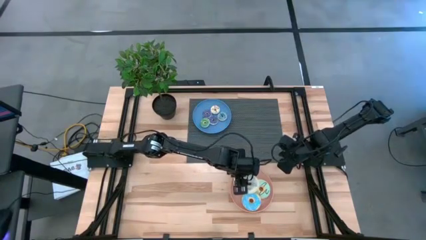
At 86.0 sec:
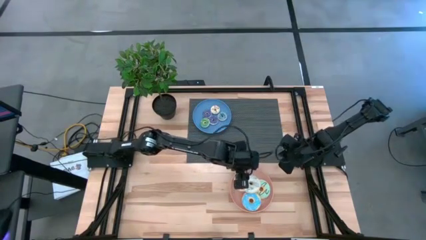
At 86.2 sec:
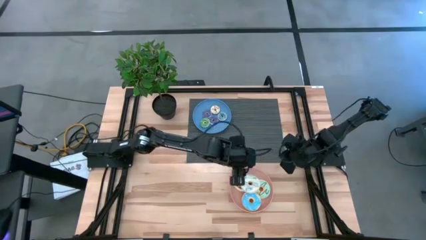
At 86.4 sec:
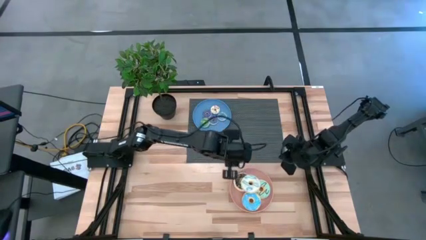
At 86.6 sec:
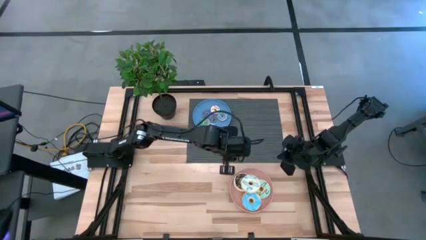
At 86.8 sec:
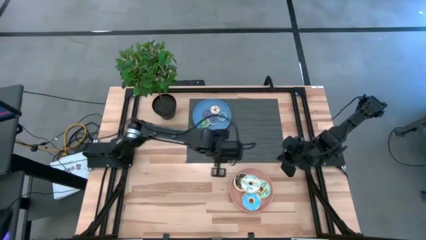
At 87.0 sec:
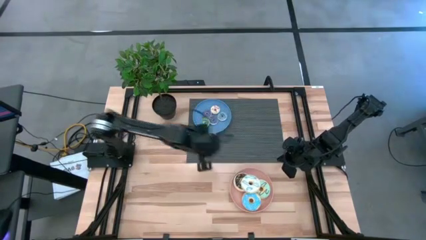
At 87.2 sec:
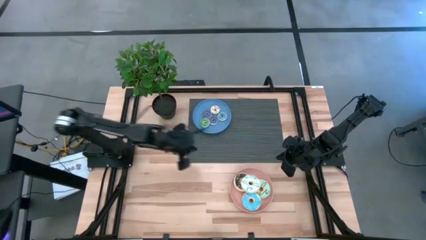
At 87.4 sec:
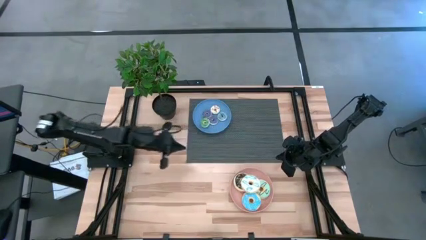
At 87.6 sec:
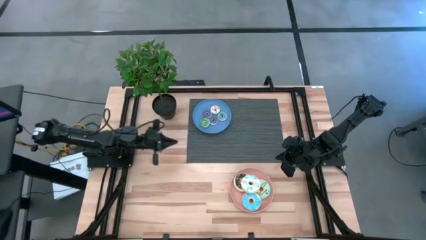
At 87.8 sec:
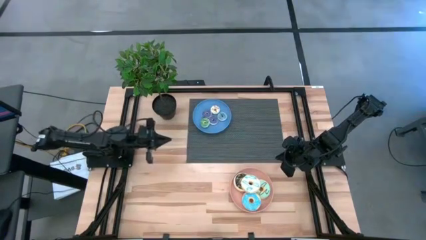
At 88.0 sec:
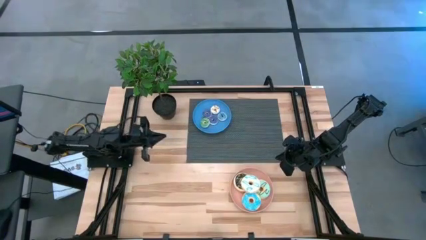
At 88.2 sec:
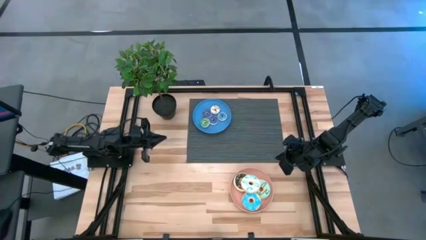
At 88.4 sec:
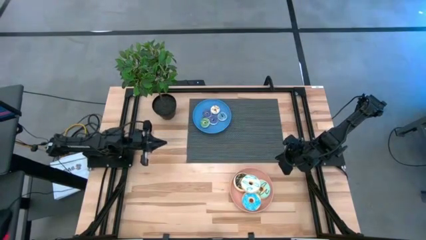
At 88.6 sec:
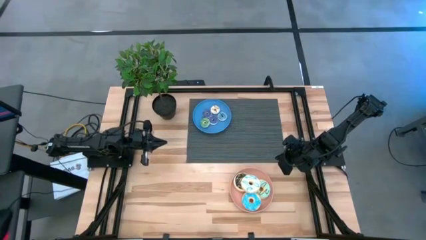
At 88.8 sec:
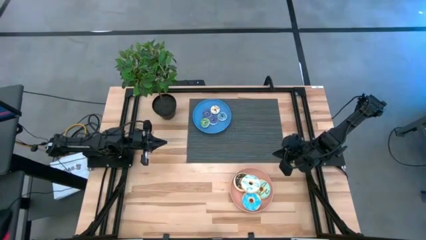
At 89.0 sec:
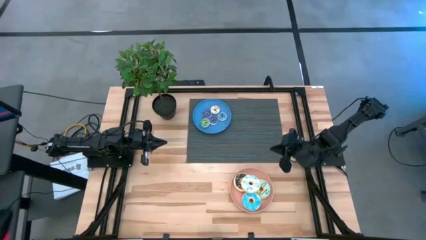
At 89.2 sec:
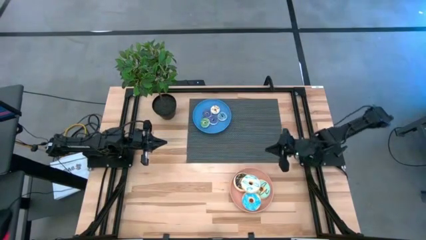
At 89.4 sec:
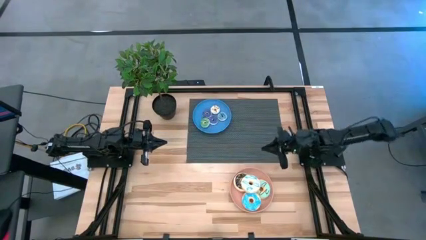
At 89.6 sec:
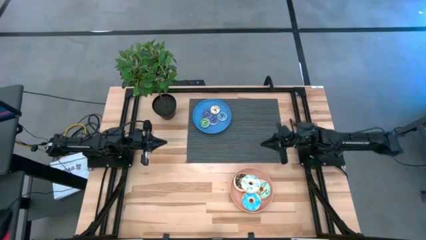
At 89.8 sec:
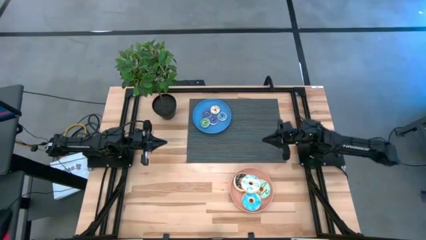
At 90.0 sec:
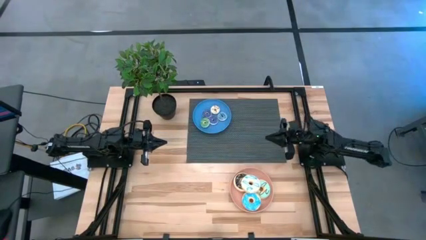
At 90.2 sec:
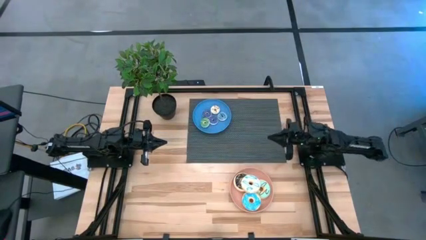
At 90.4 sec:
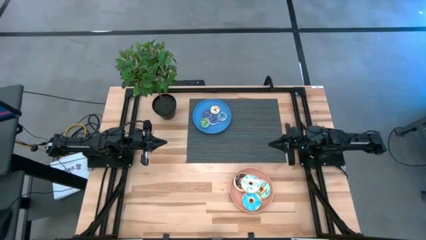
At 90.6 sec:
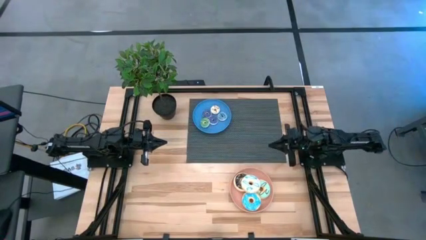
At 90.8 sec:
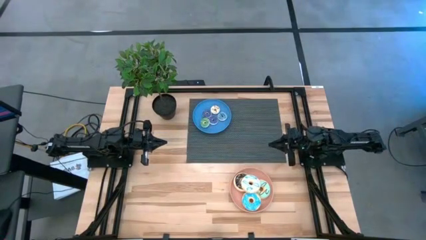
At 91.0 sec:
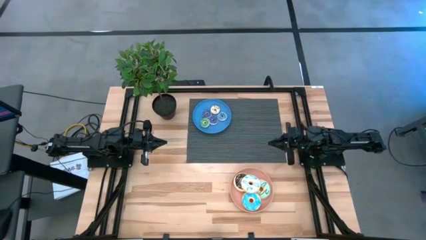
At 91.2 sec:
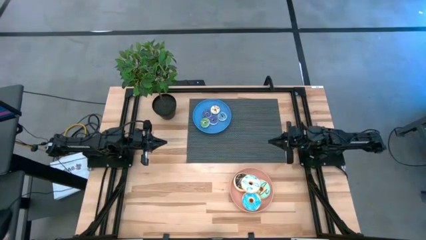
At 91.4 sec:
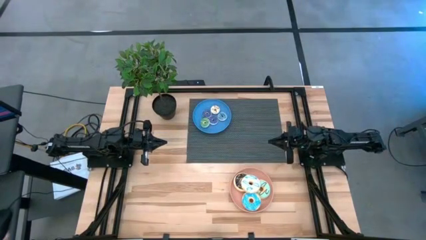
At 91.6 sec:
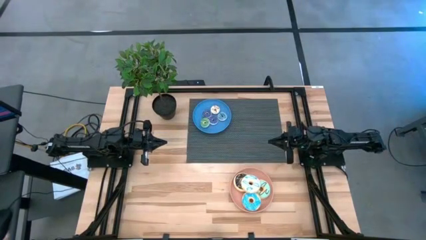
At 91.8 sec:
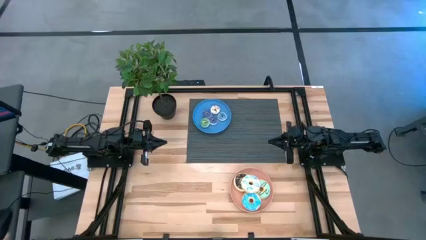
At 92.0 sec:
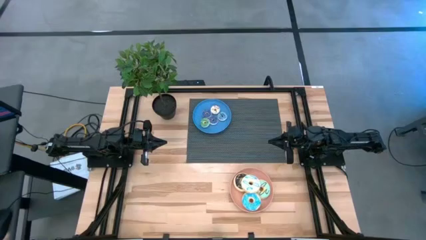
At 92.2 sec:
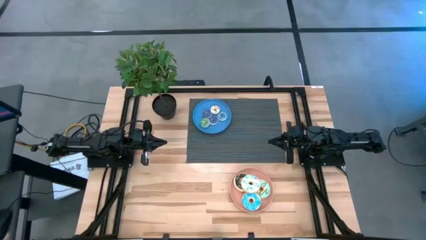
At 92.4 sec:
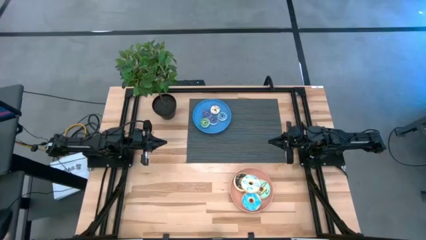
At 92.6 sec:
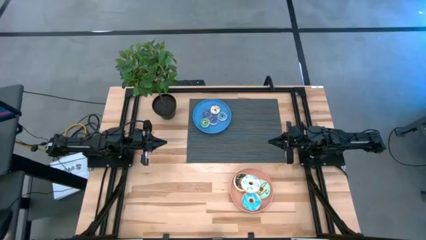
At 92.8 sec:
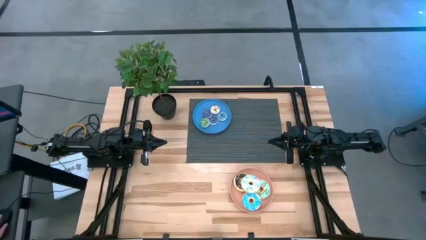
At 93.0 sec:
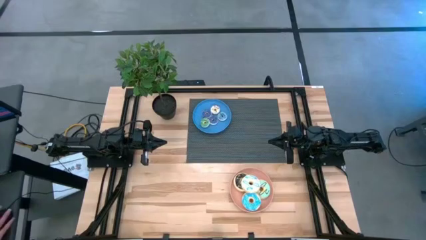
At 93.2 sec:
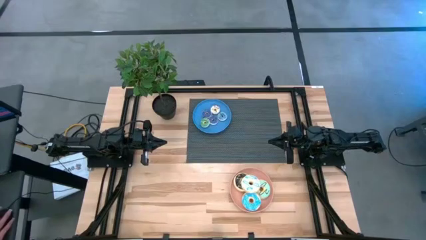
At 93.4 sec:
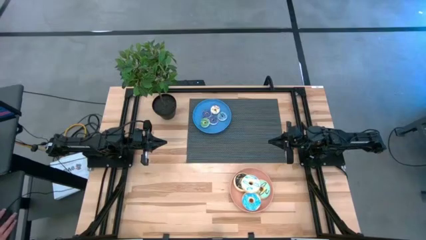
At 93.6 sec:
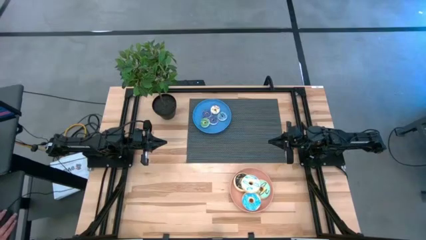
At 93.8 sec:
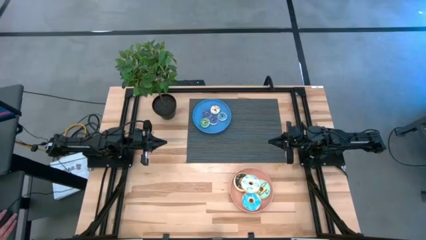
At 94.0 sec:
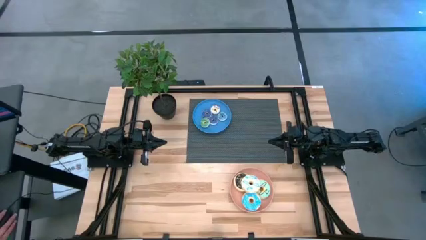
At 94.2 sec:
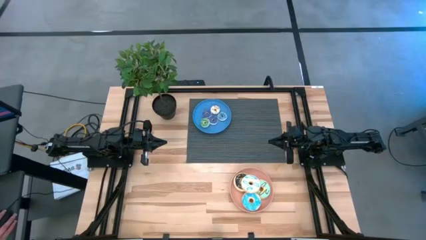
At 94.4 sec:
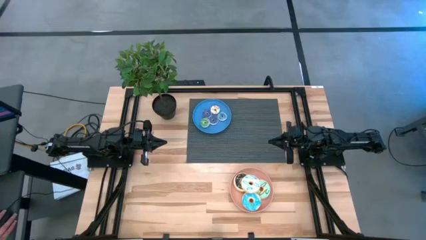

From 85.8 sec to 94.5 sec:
Task: Pick & Place donuts
Return to Home Position

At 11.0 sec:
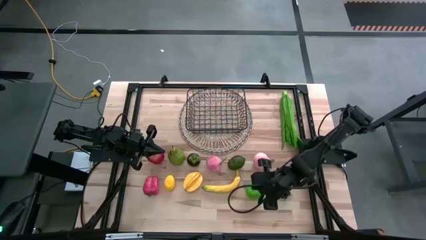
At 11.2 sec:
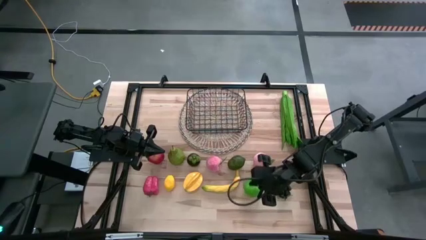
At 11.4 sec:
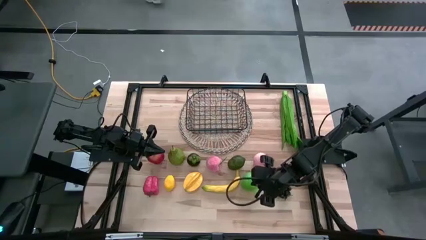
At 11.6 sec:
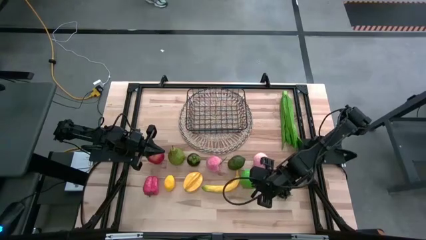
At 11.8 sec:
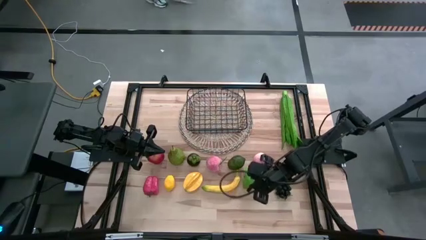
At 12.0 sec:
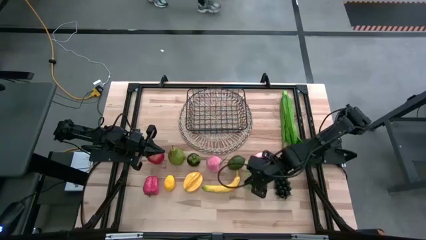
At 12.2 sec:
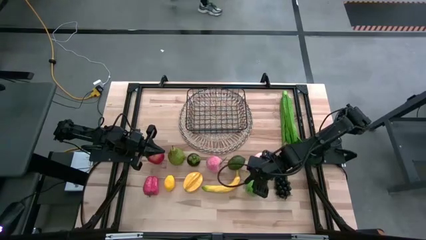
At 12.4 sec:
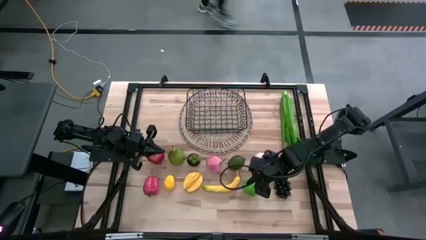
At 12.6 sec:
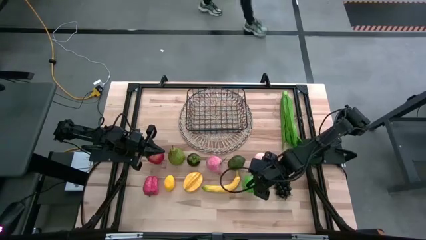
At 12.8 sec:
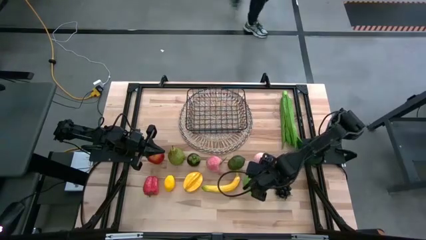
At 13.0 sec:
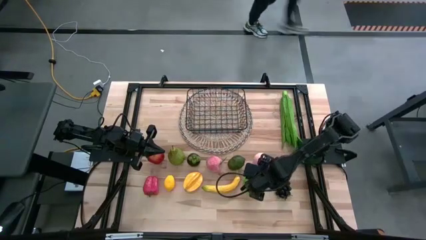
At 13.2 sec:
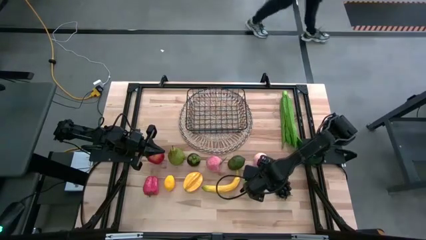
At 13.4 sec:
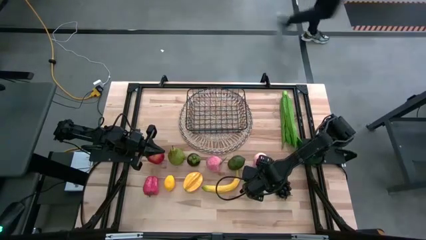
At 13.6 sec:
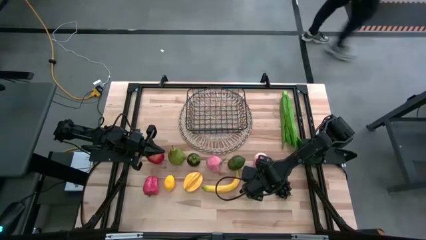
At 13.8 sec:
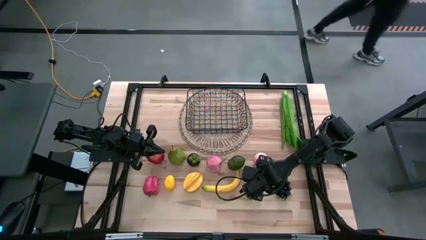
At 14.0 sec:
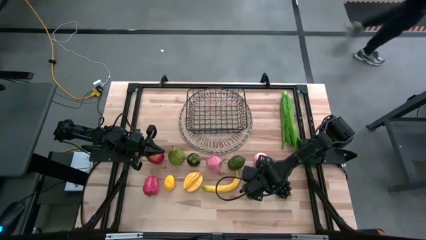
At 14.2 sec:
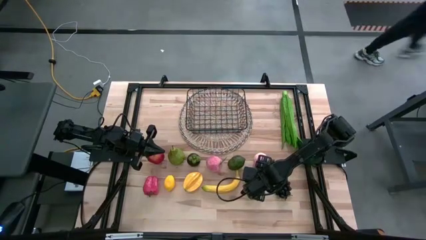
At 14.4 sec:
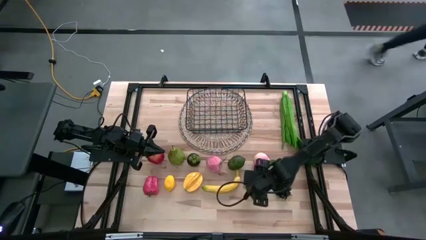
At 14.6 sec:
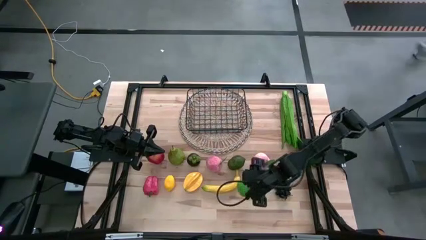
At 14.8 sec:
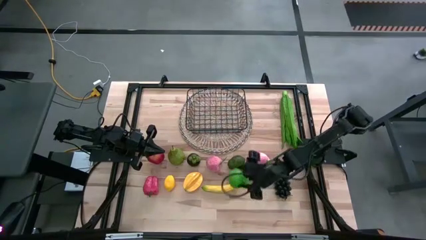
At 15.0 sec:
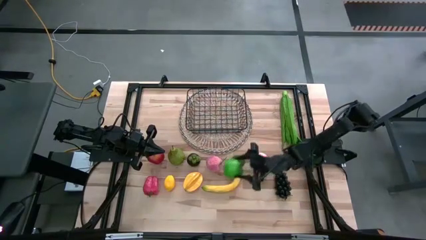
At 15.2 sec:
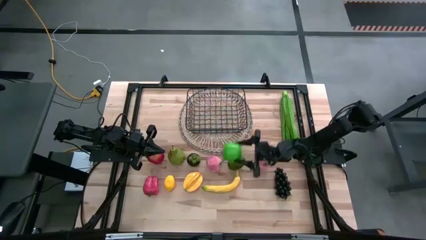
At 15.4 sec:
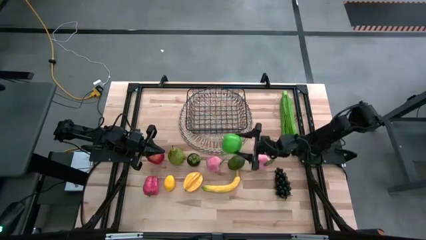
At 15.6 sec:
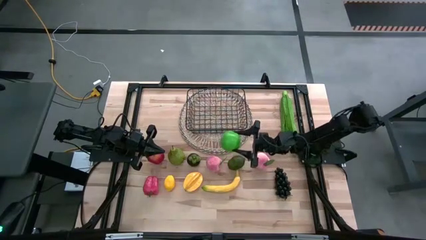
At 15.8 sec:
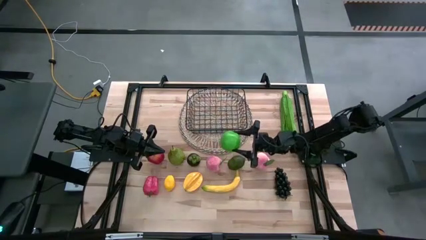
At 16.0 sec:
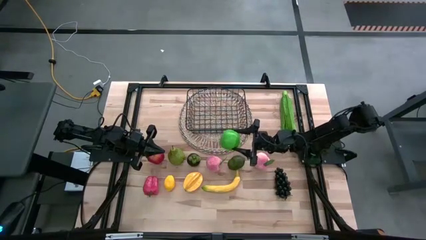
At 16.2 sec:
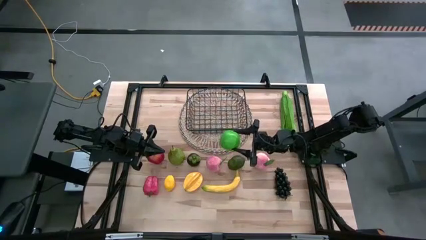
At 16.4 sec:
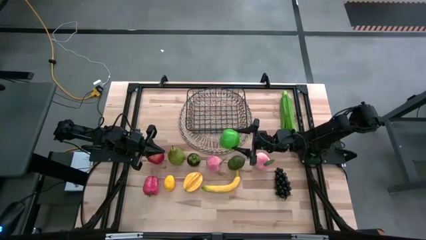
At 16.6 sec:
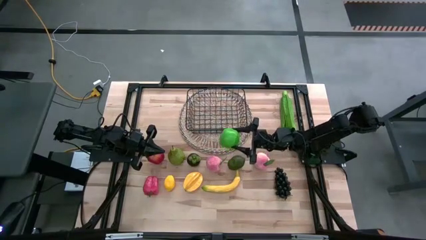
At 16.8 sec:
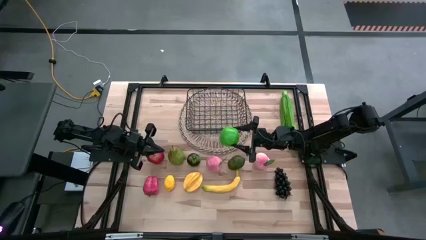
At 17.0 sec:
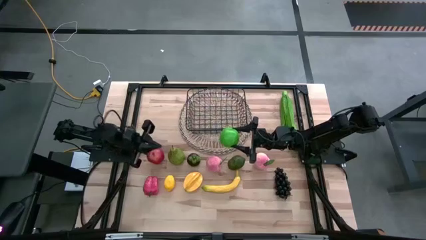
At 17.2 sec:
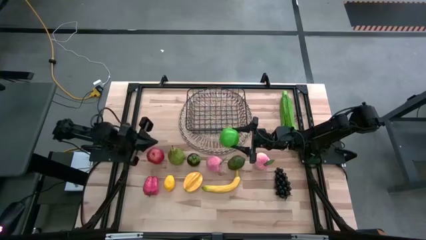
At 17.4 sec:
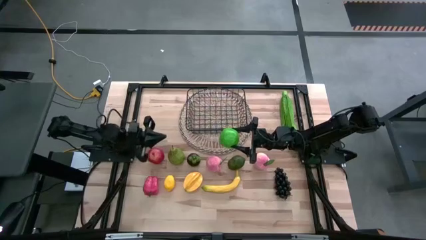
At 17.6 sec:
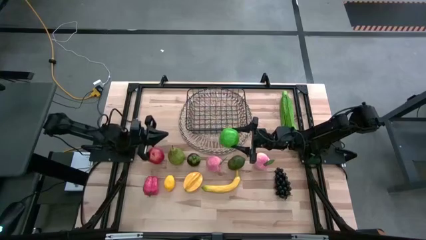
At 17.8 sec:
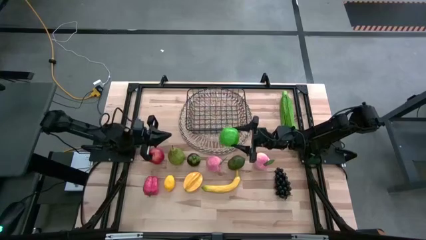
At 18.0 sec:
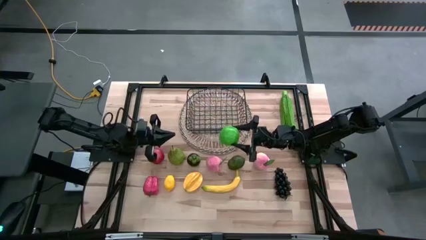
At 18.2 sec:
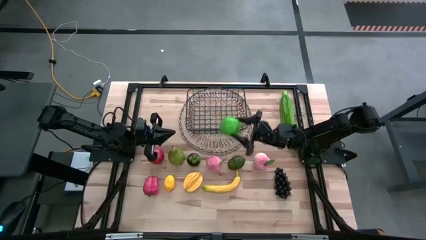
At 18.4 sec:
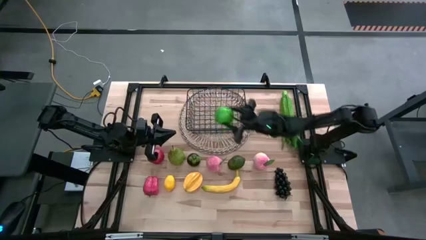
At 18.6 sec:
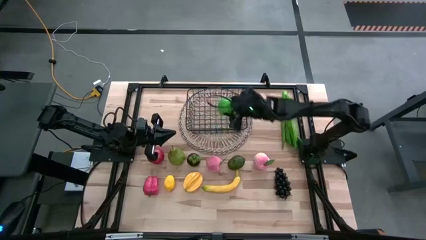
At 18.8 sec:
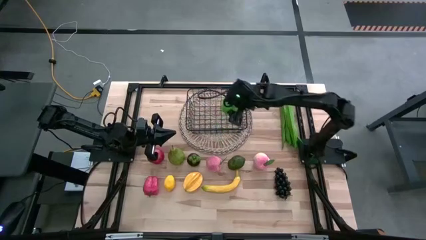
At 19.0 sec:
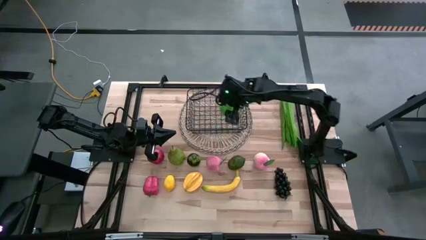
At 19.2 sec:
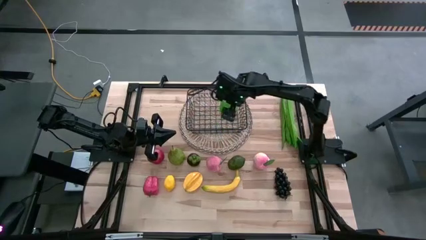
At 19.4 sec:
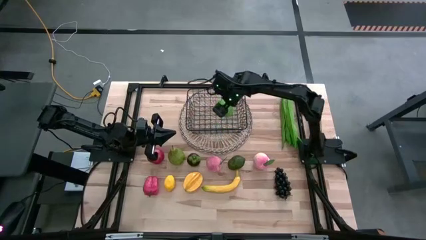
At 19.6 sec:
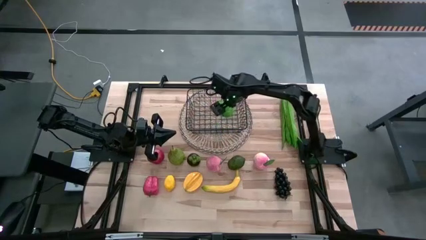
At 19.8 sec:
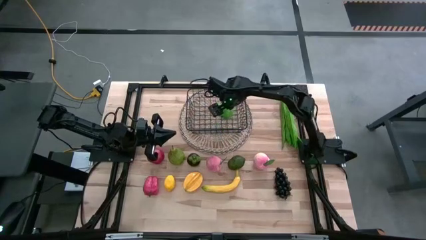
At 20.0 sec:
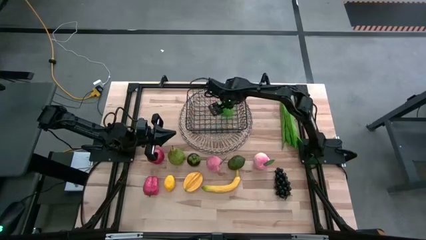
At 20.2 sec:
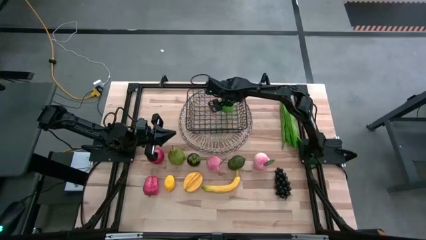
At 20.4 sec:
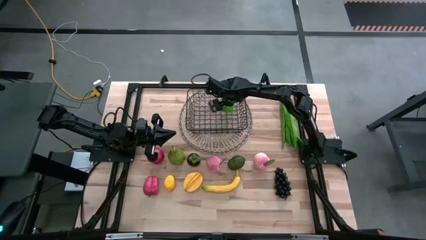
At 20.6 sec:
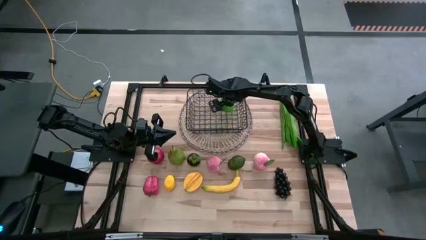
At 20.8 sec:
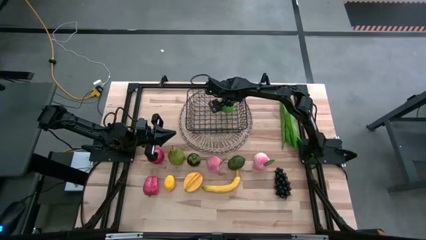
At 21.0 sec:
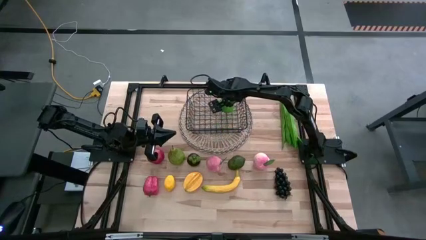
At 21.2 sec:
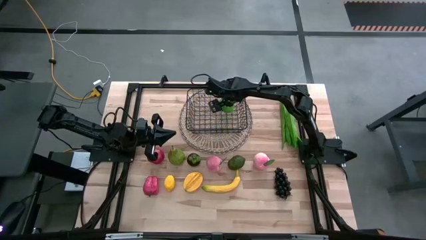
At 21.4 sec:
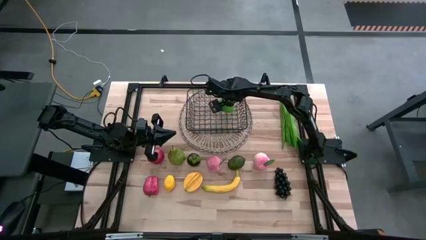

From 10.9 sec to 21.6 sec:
Task: Build produce basket
Put the green apple into the black wire basket
